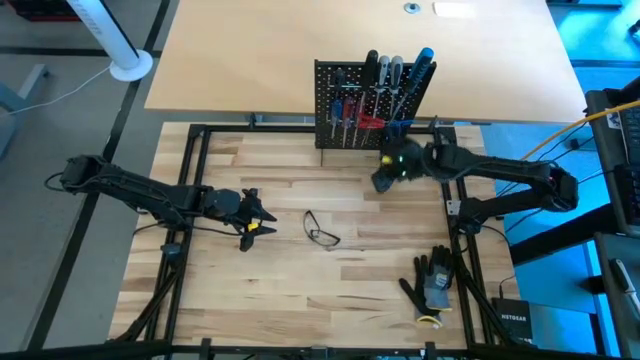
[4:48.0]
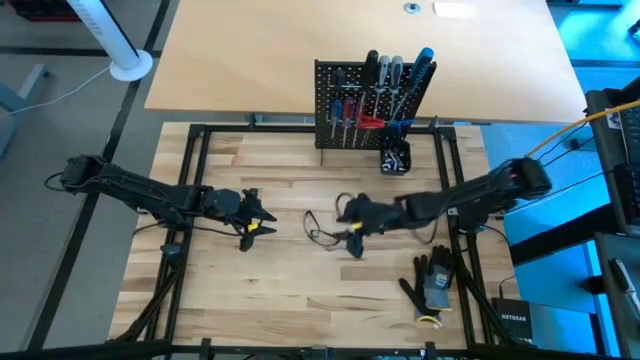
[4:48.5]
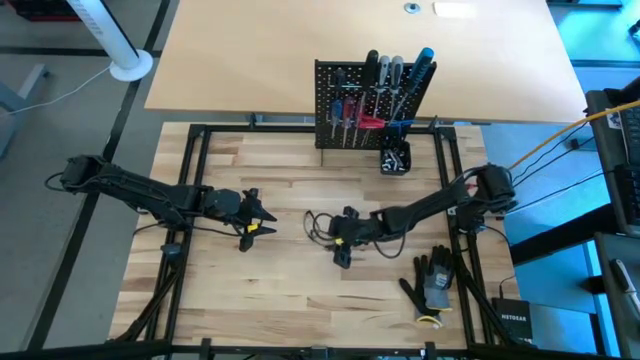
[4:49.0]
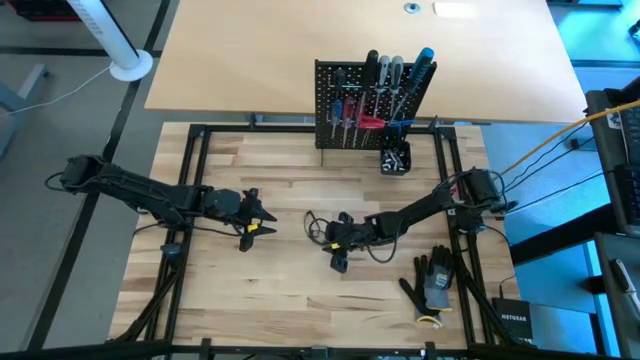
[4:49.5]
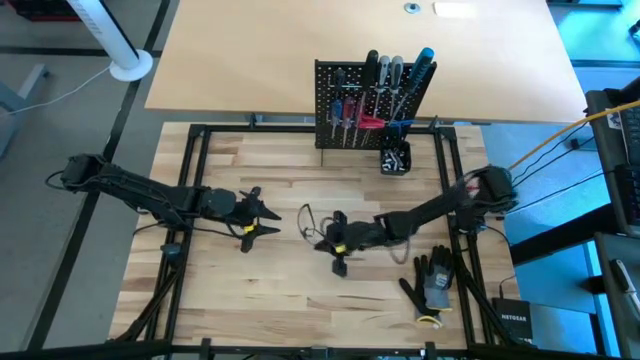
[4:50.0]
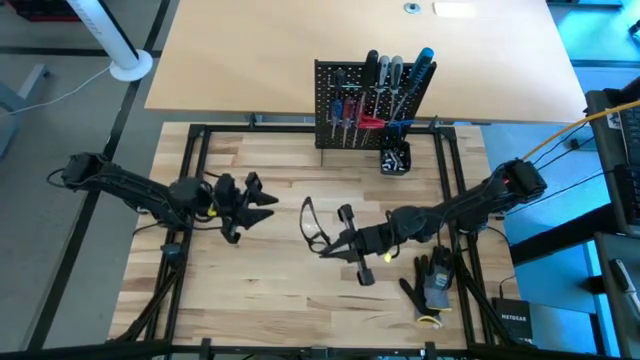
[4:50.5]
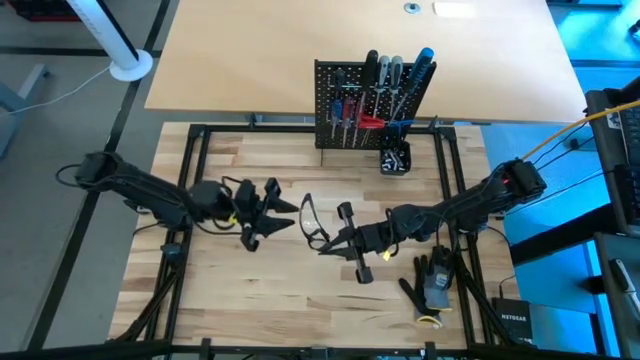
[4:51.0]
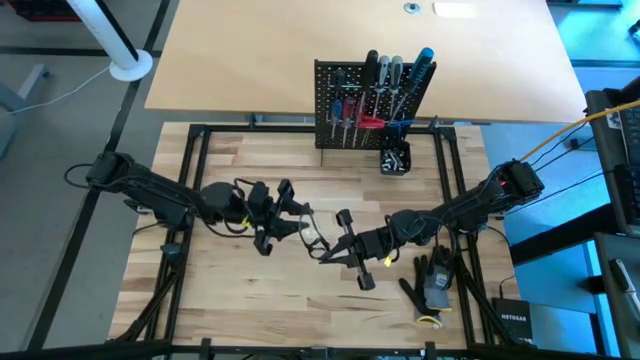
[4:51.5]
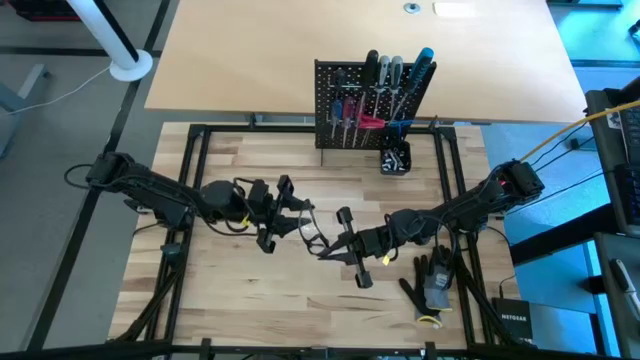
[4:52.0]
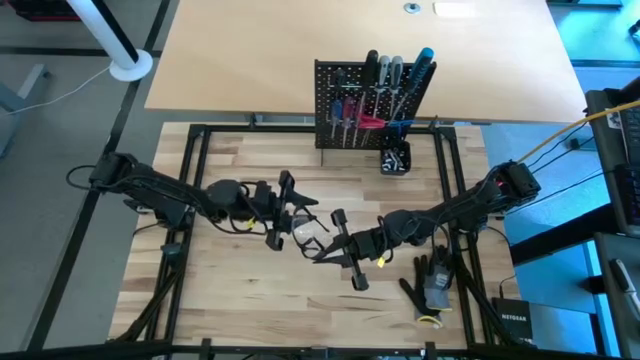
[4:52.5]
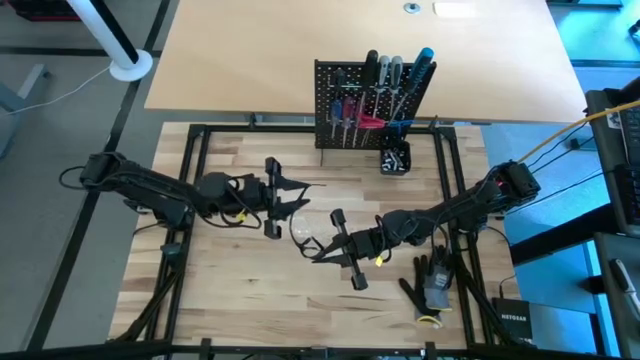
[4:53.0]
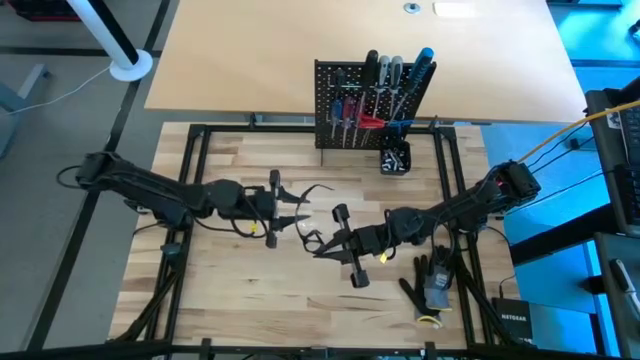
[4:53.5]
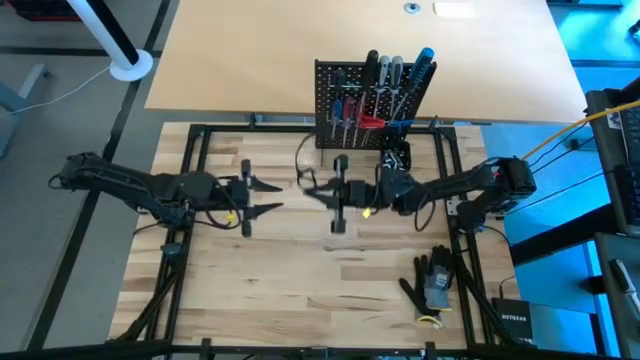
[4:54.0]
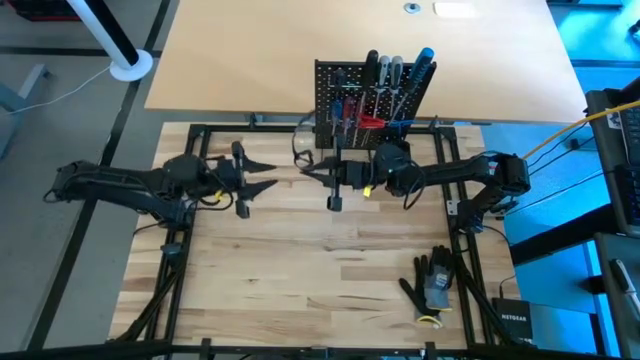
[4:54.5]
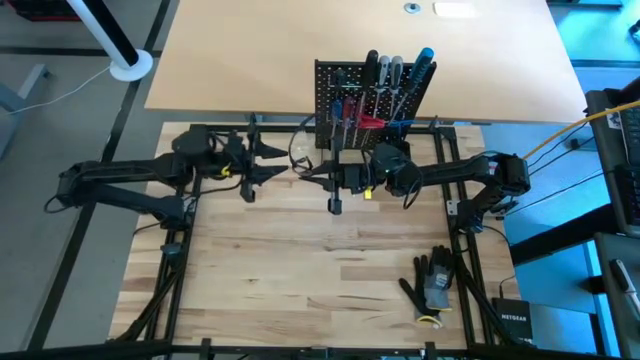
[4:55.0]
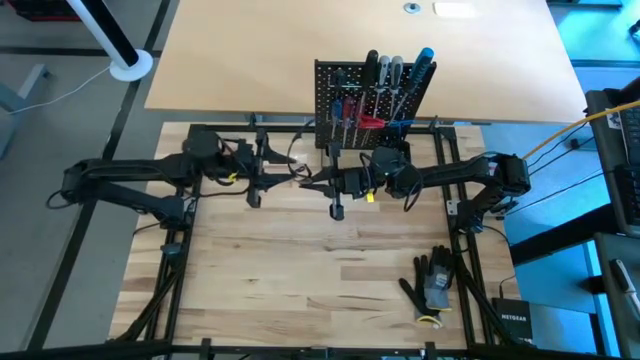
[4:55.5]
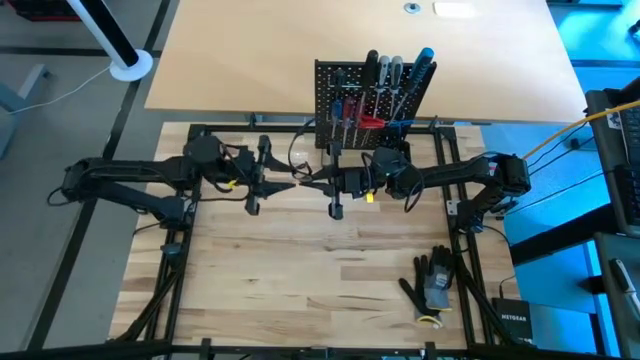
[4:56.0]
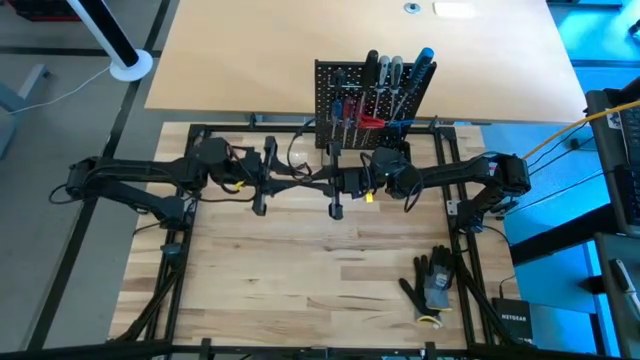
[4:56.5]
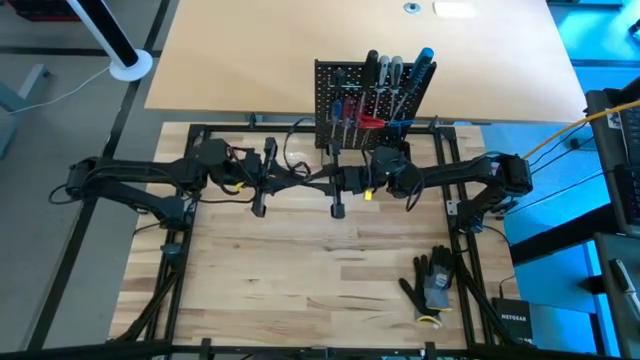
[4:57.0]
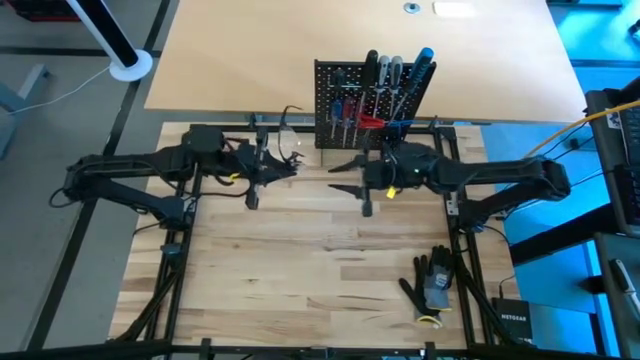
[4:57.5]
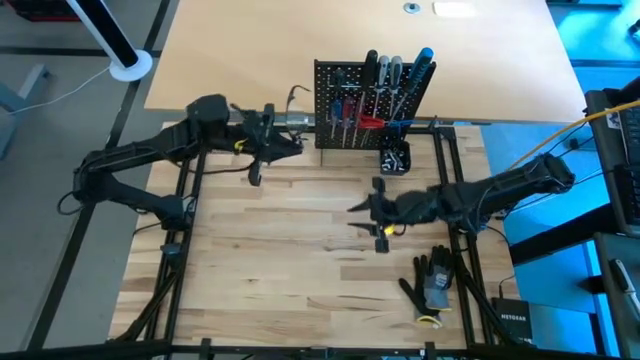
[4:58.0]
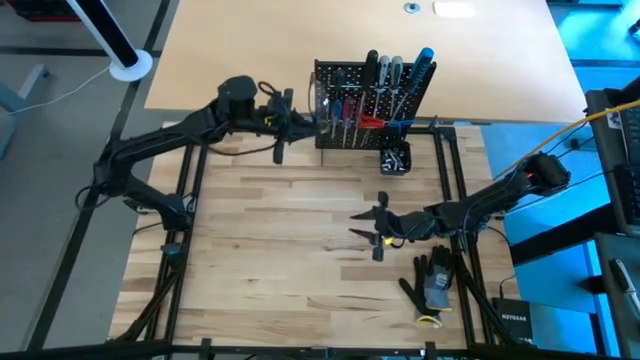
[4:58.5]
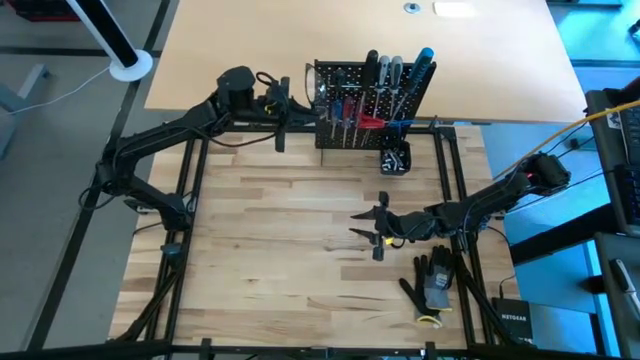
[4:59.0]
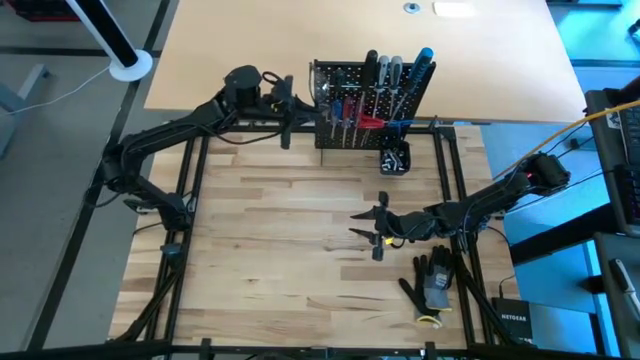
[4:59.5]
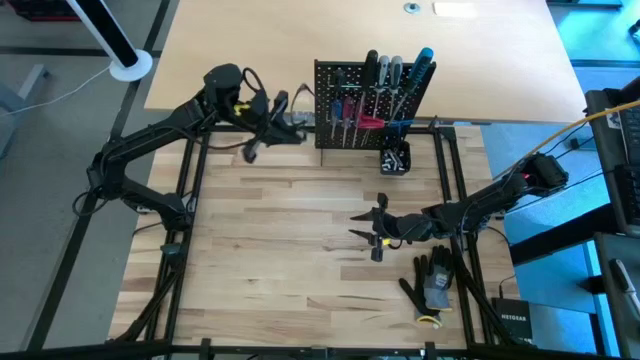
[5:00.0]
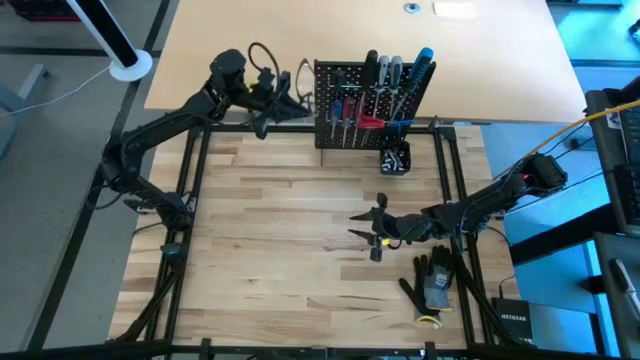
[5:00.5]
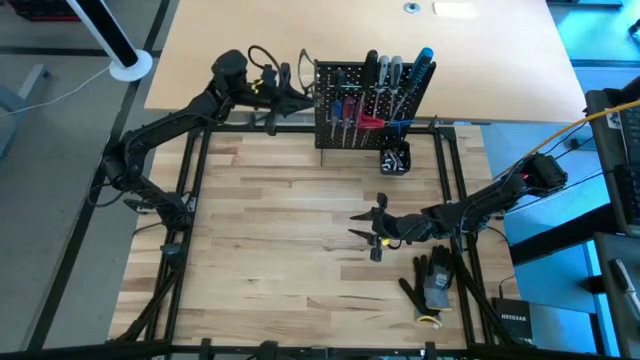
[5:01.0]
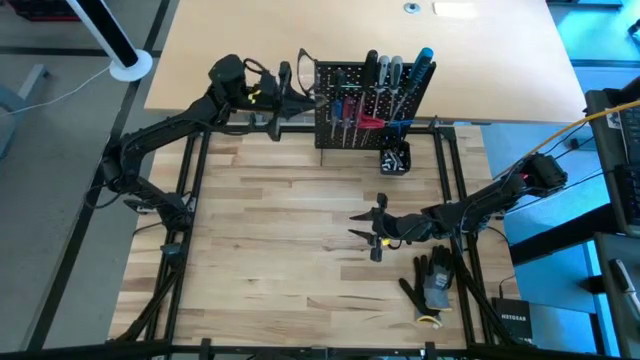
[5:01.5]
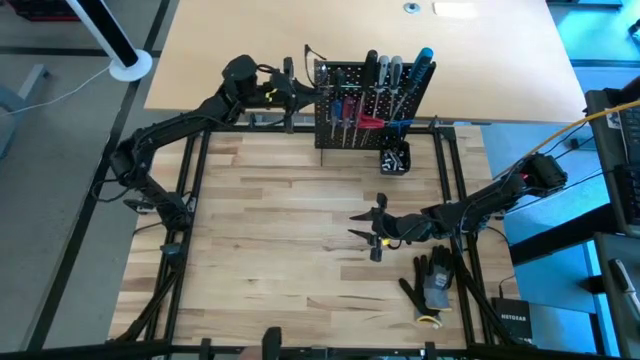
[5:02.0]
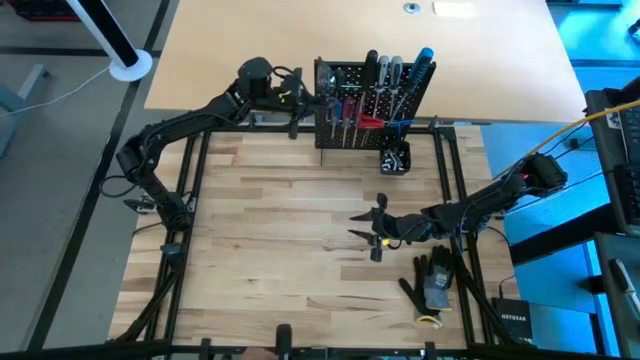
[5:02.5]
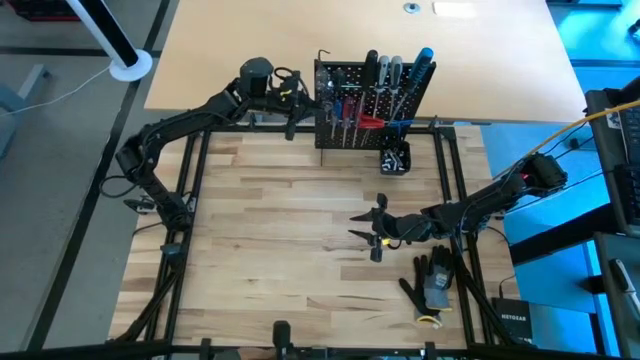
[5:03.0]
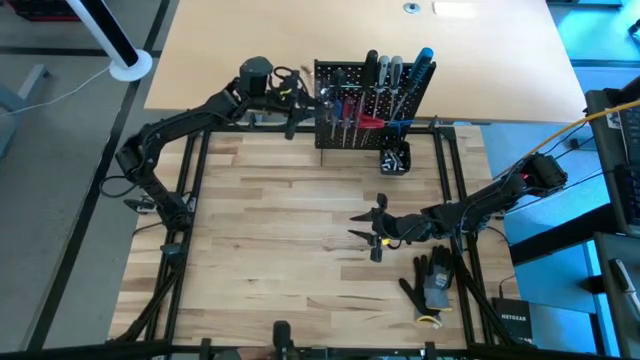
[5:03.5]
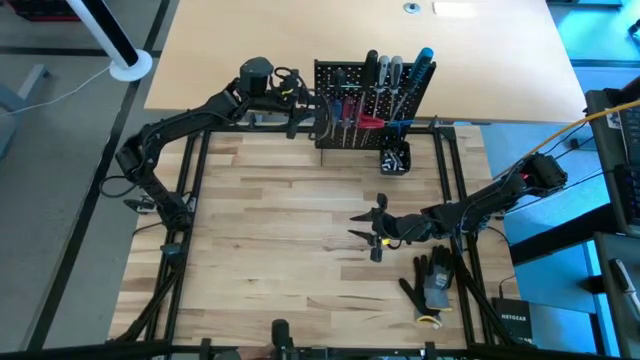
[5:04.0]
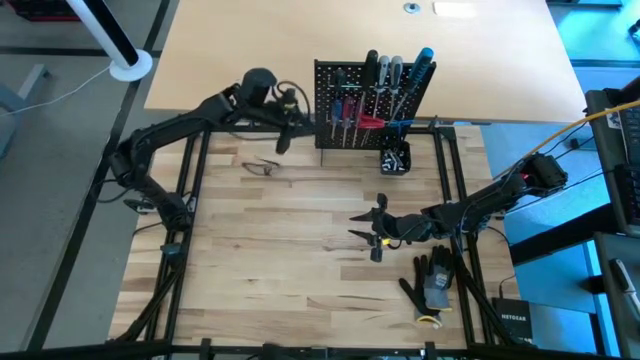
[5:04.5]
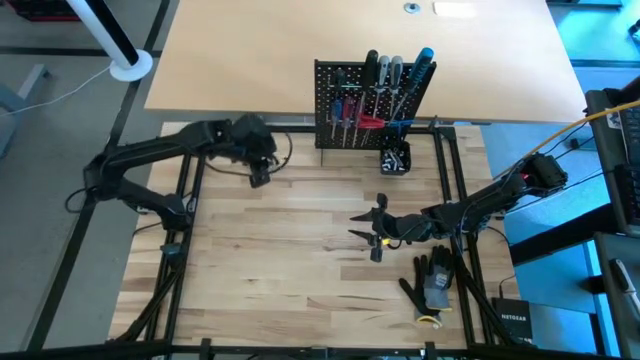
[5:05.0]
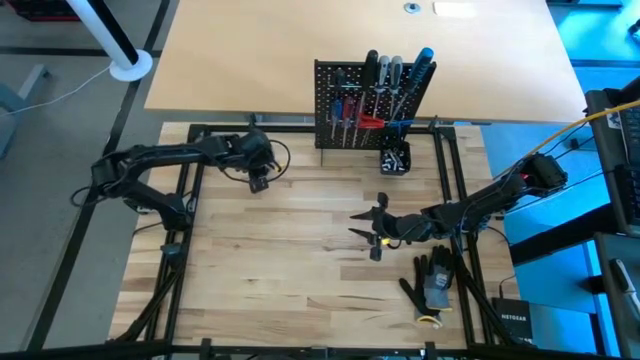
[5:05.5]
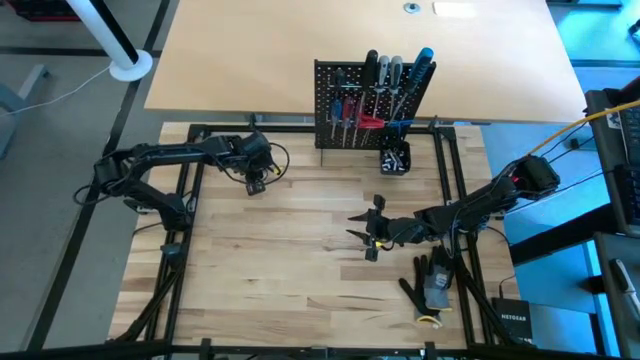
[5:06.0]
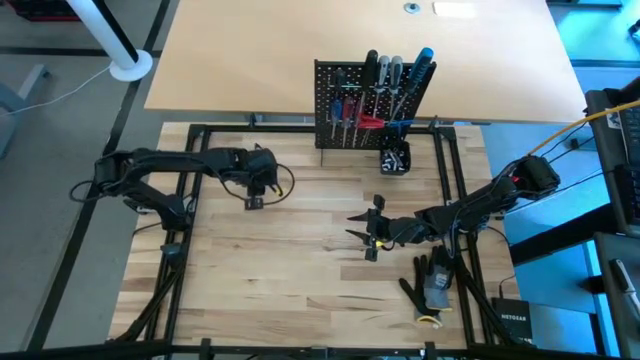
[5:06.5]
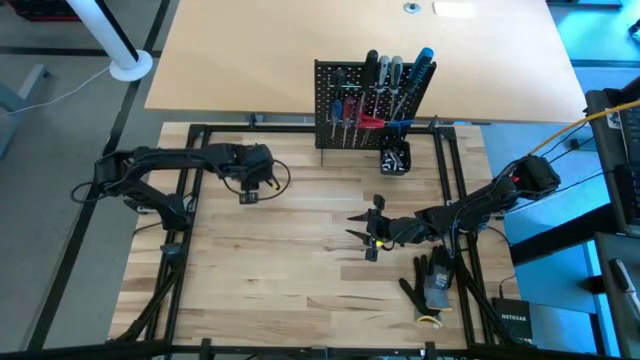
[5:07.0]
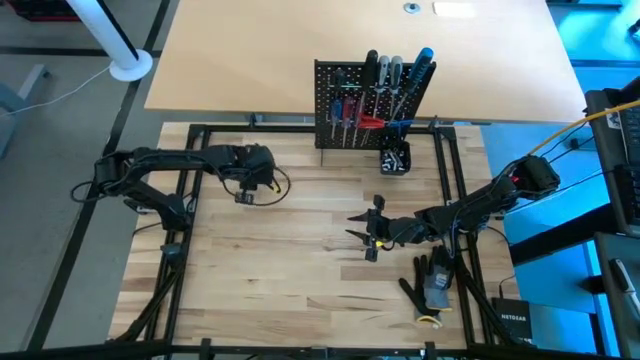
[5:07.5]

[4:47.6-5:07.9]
Task: Hang tools onto peg board
Hang the black safety glasses on the peg board

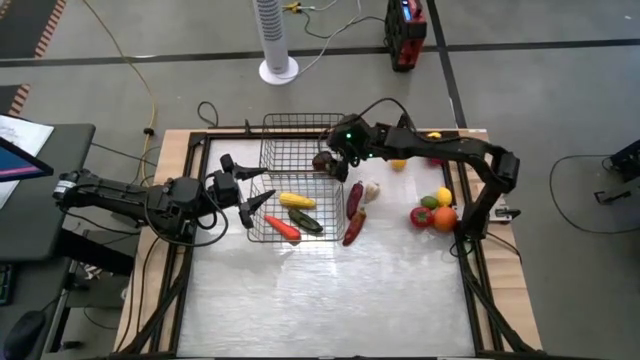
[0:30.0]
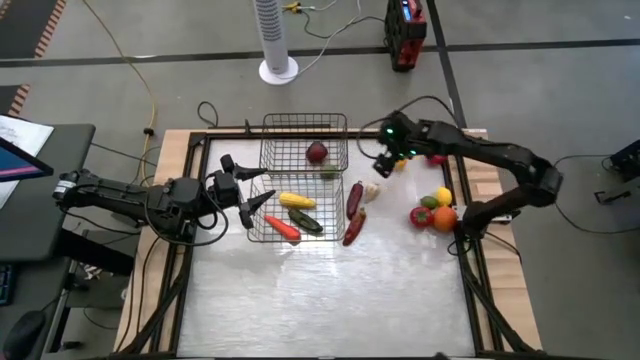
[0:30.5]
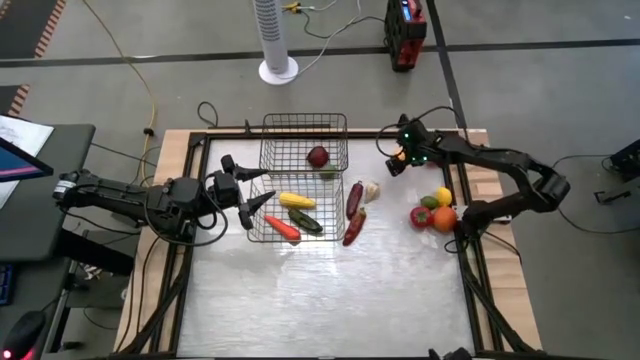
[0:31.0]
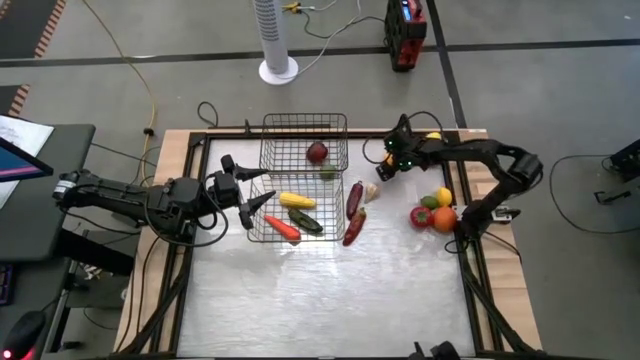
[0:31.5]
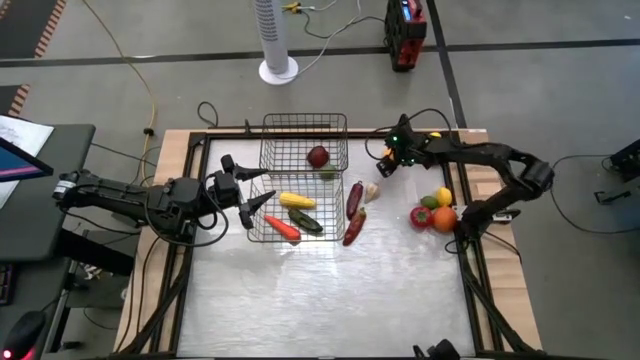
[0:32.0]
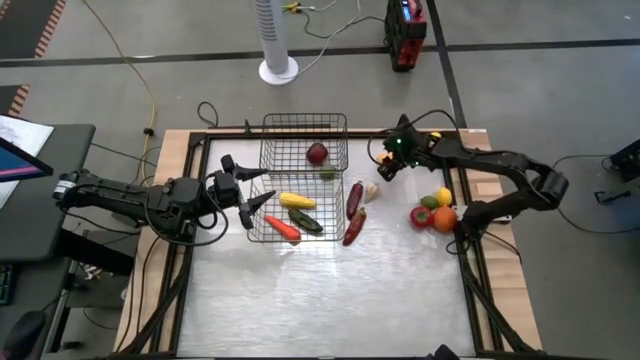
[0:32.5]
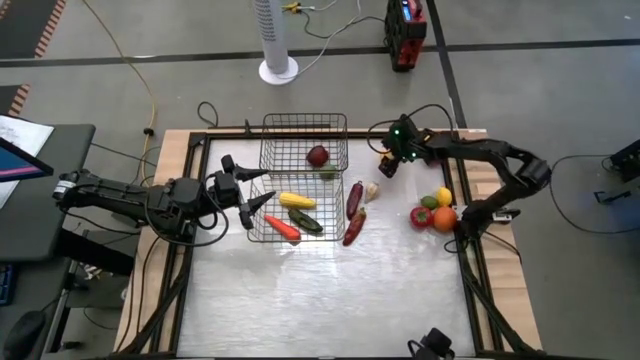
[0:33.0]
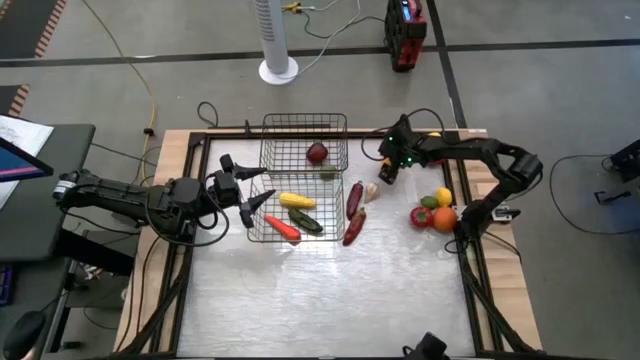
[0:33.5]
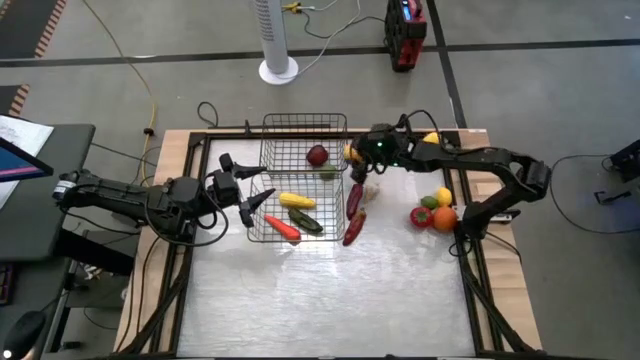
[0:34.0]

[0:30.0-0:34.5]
Task: Sort produce into baskets
Put the lemon into the top wire basket
